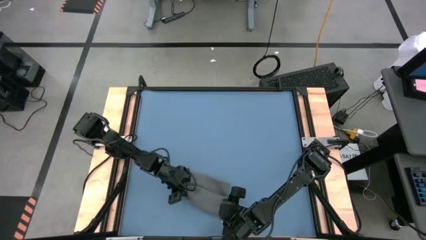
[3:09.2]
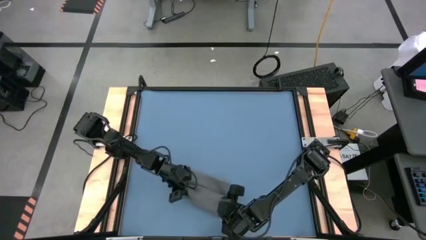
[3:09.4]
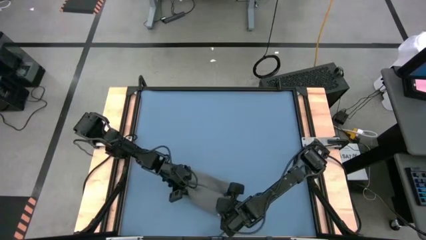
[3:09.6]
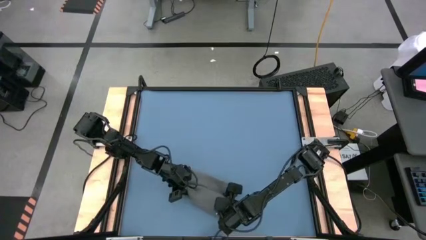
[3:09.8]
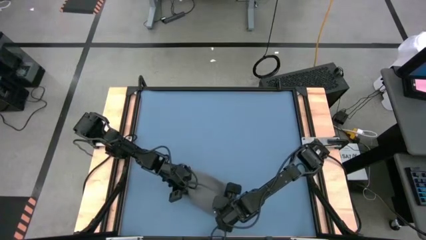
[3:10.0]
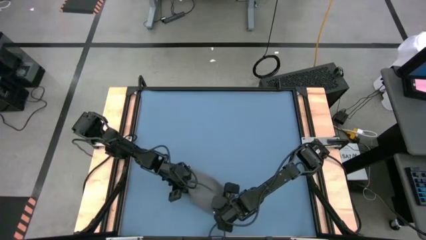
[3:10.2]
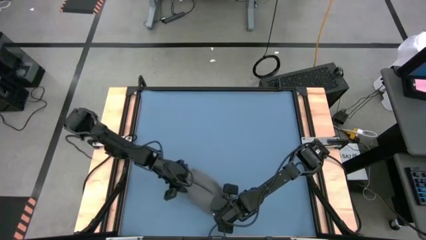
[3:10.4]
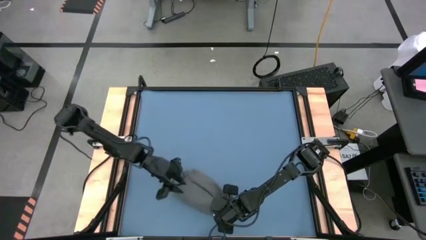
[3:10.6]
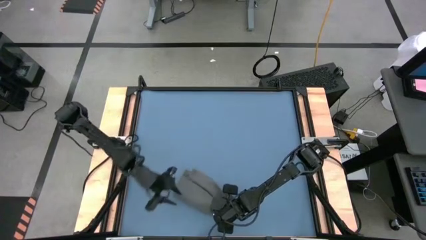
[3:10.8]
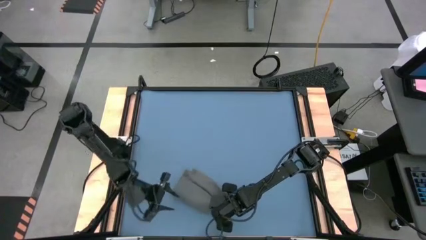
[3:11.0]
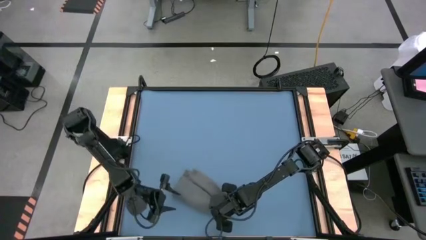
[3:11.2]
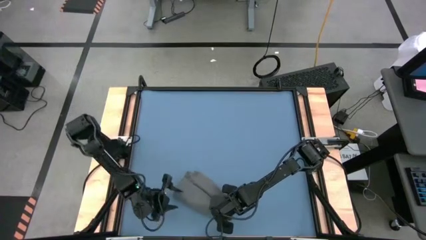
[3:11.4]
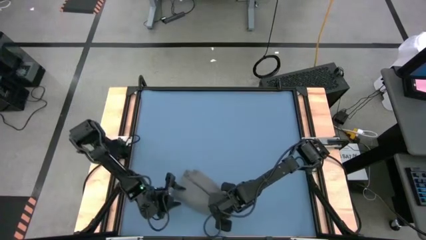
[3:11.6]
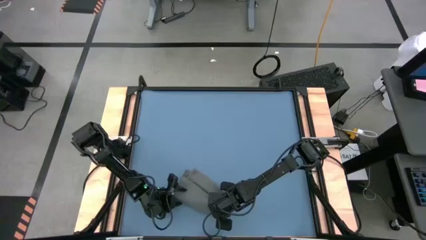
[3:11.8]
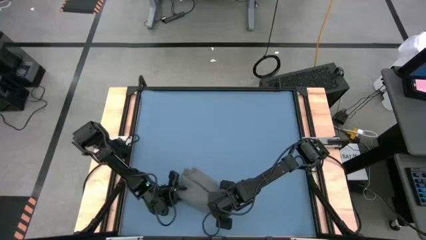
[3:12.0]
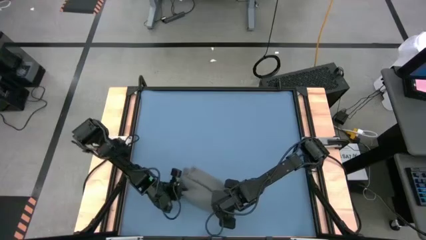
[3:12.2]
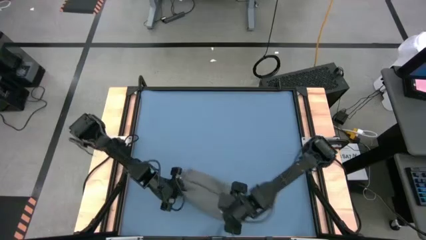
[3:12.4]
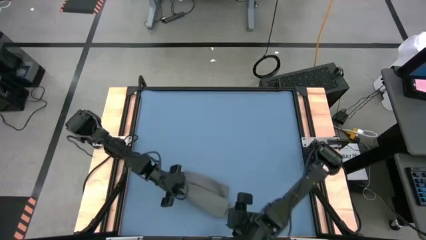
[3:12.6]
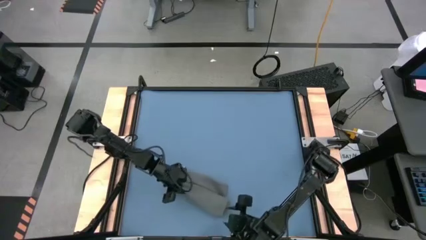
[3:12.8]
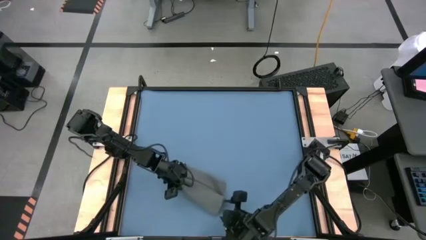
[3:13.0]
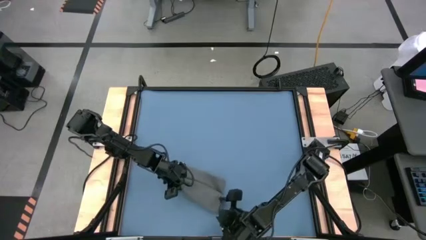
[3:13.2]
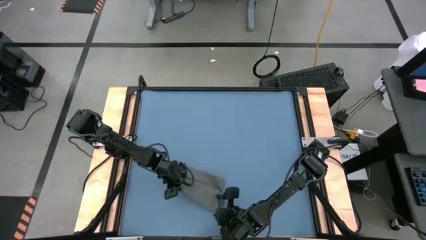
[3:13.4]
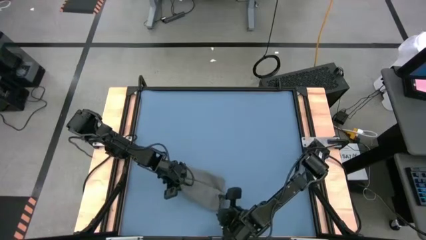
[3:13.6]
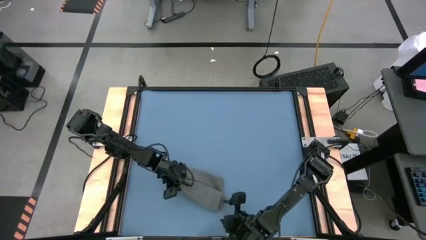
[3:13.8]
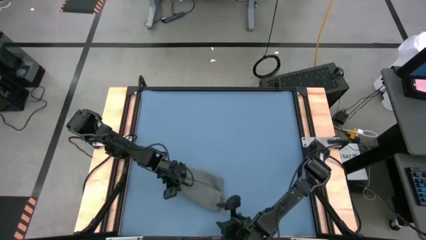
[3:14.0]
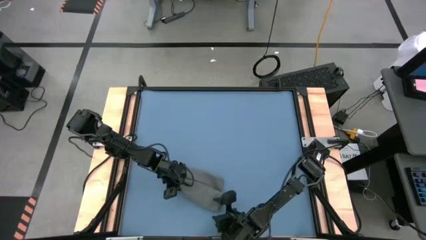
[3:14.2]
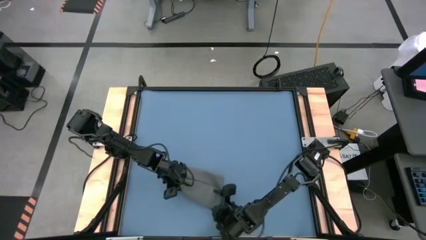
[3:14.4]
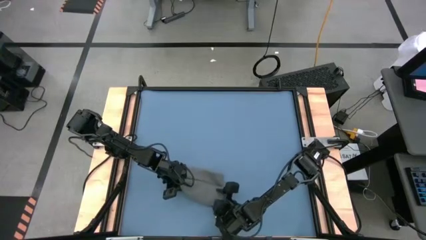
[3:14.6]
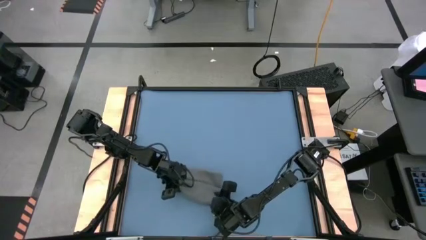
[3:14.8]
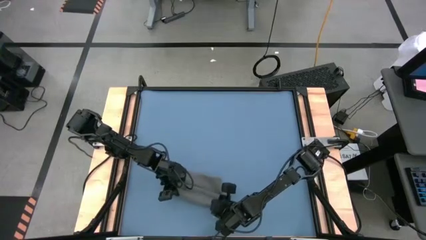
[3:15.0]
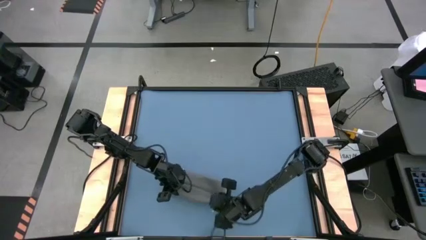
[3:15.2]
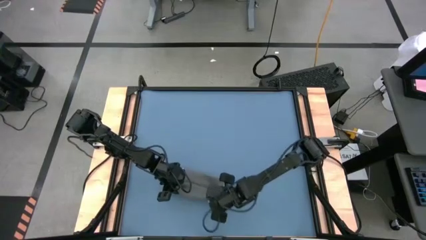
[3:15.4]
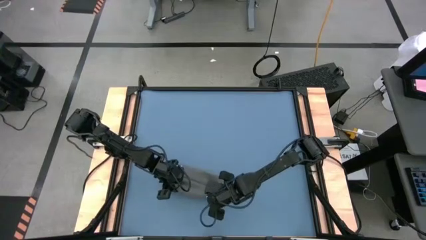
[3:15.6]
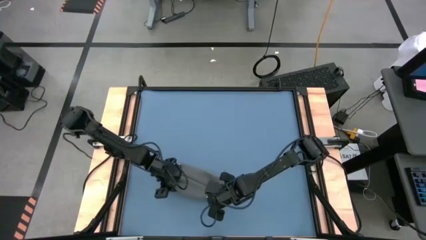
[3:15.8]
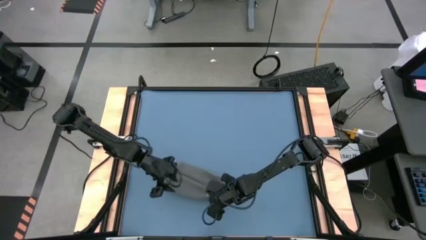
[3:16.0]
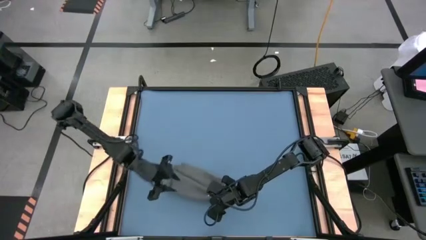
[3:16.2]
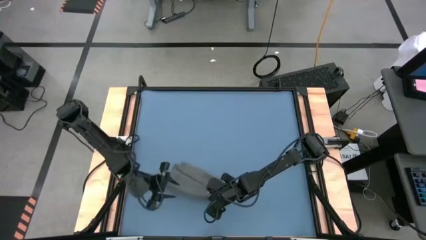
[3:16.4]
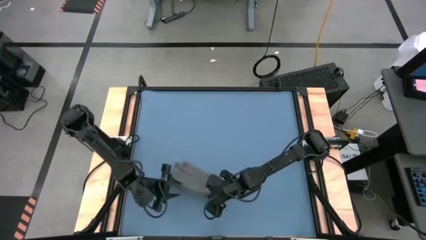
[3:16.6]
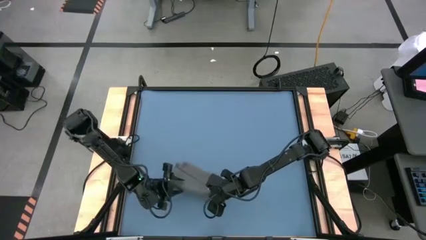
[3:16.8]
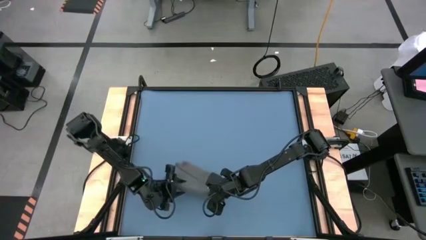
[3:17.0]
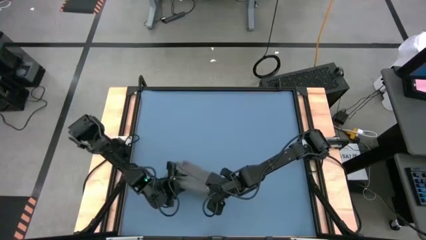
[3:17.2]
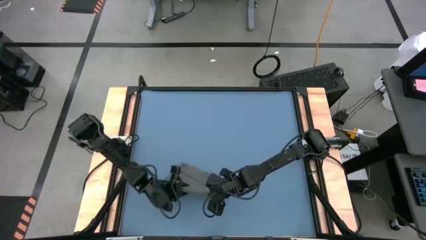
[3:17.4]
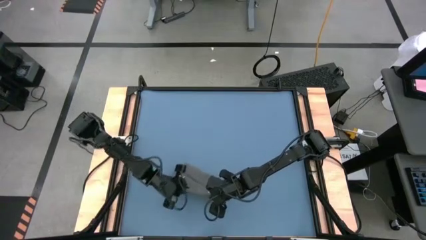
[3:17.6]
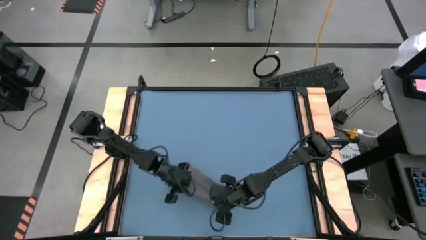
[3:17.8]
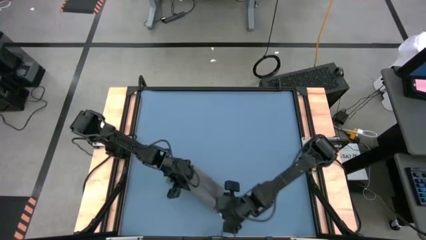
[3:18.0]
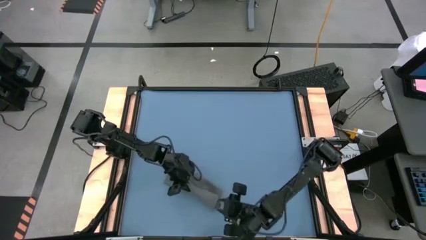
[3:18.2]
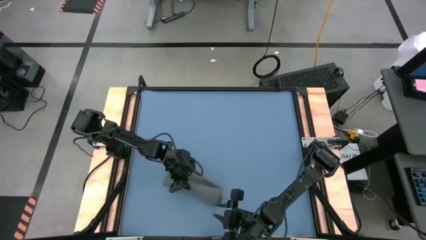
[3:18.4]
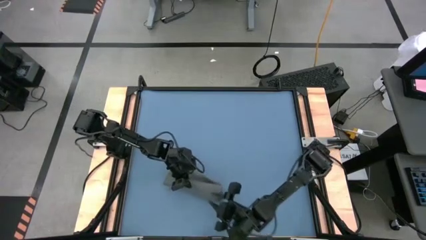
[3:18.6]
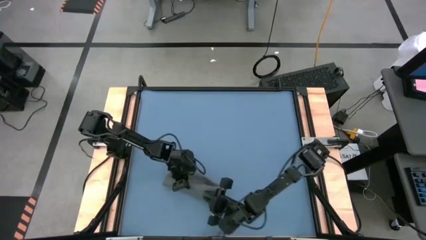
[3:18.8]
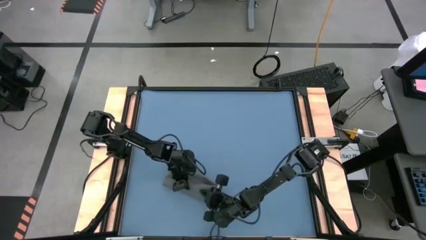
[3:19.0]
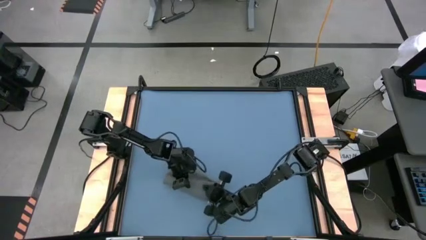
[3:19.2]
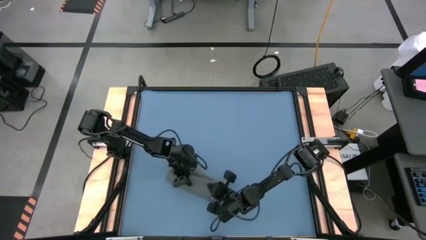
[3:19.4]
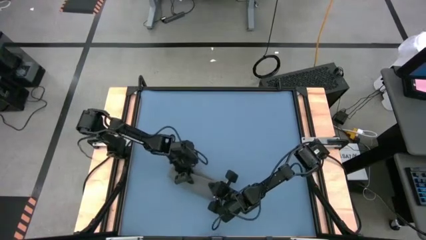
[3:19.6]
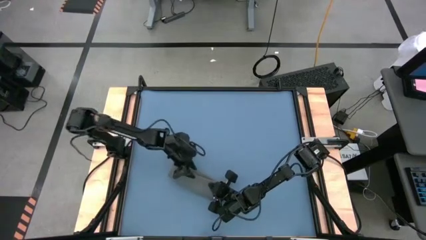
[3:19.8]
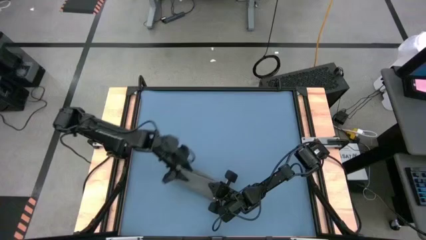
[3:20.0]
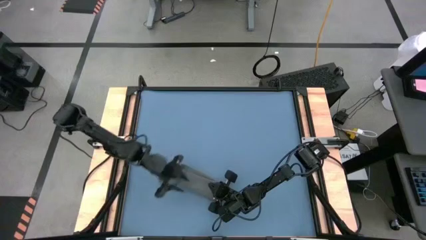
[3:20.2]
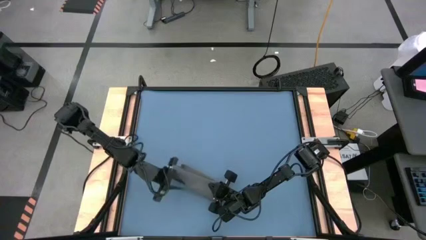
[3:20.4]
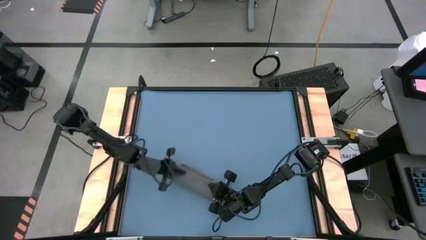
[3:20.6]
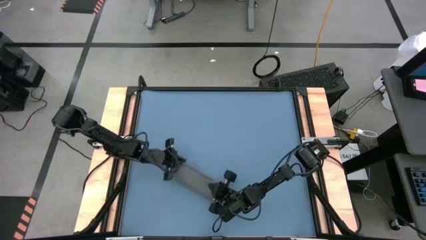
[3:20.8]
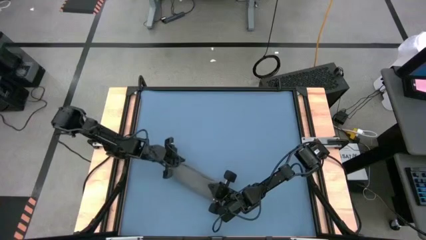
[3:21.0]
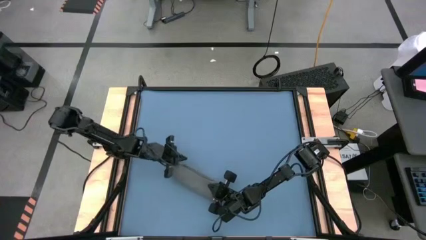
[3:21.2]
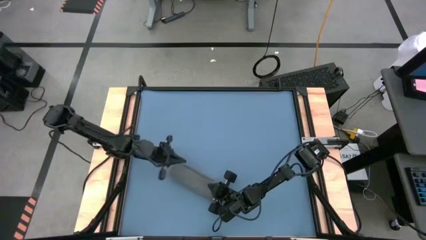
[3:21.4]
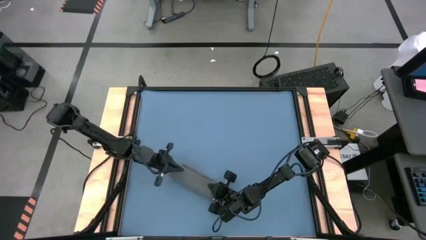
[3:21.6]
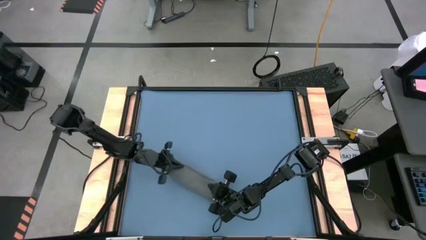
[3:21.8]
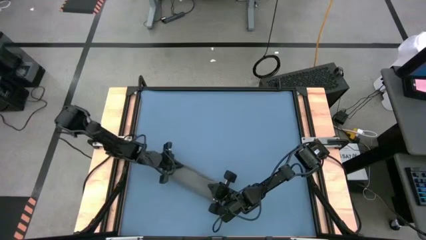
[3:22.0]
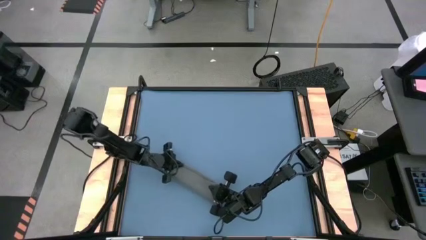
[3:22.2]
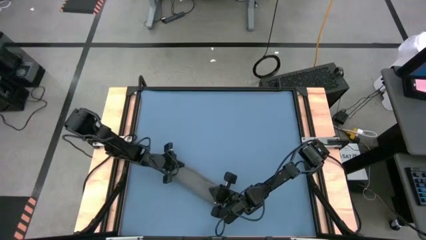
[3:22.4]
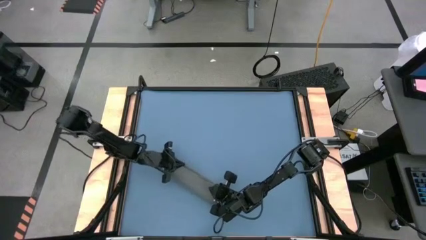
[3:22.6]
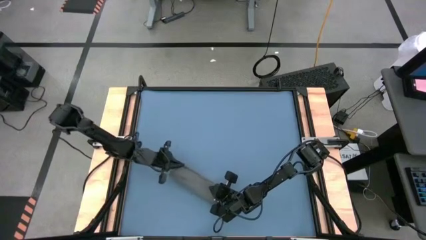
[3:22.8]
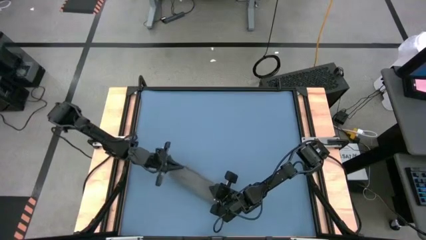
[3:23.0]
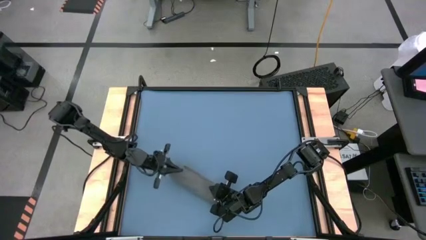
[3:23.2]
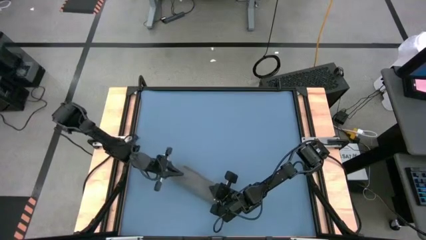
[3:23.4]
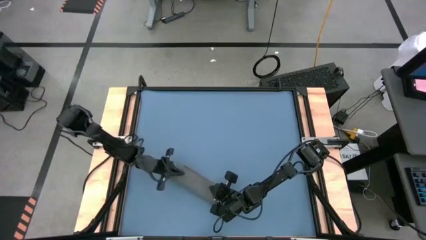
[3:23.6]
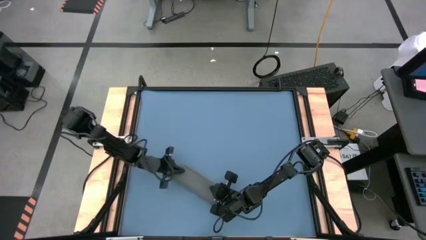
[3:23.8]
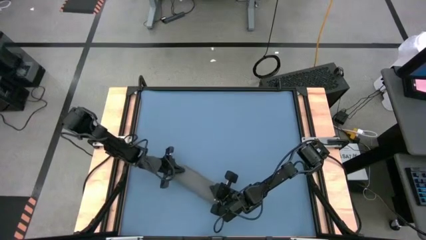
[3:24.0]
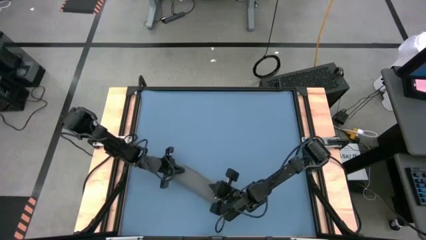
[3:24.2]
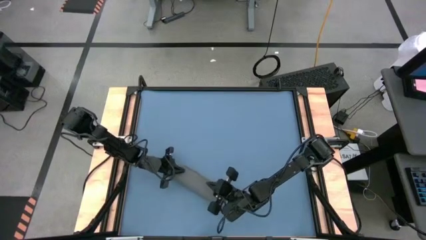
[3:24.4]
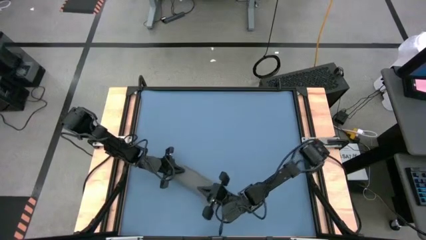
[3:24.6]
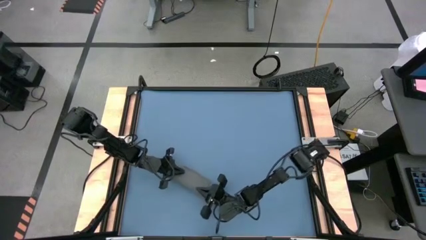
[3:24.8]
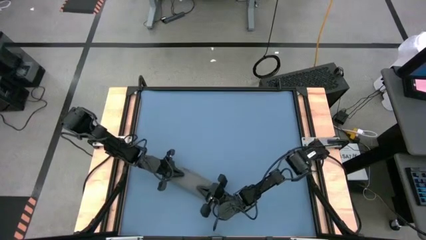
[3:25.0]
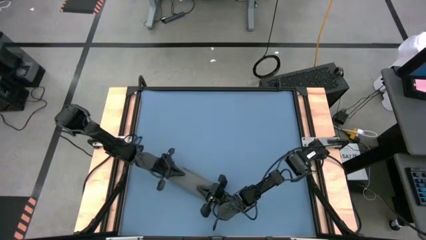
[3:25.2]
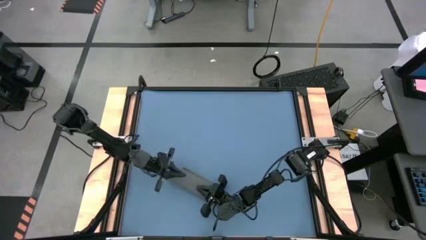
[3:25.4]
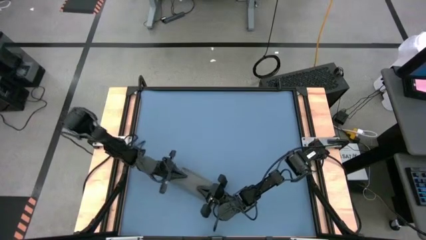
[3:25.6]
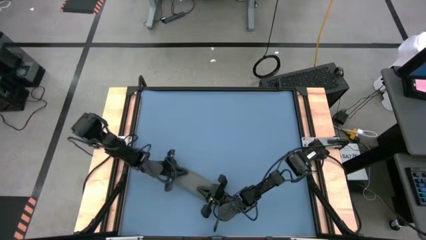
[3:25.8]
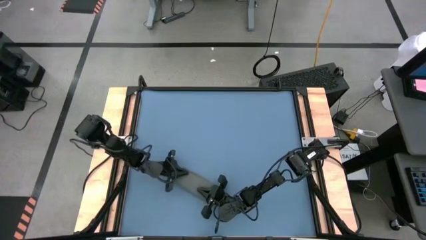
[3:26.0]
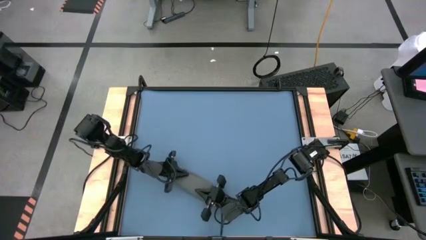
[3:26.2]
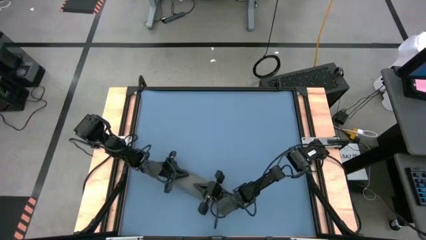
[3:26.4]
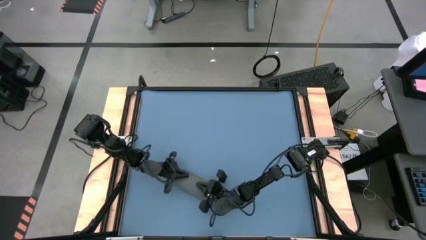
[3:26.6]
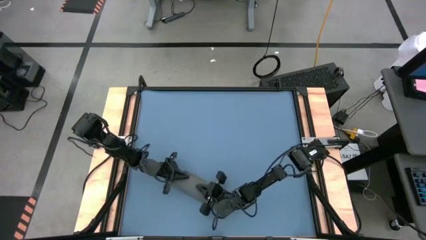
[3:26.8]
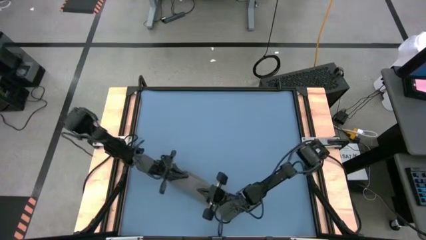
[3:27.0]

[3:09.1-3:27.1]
Task: Roll towel
Roll the gray towel
